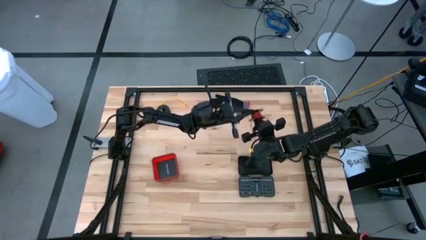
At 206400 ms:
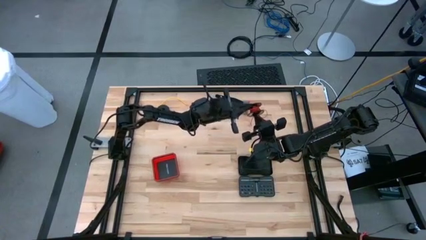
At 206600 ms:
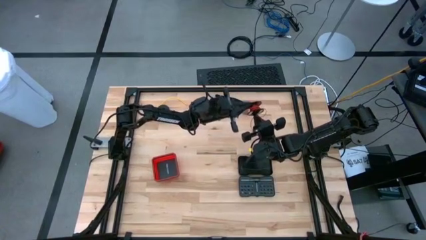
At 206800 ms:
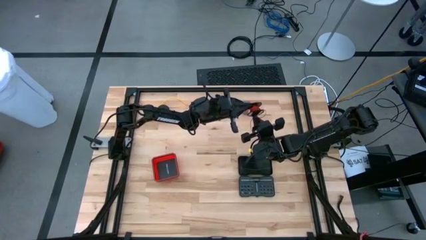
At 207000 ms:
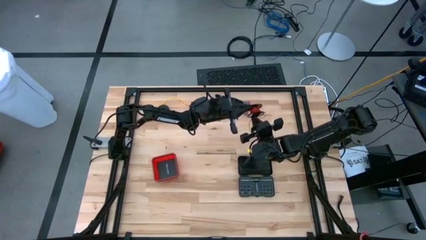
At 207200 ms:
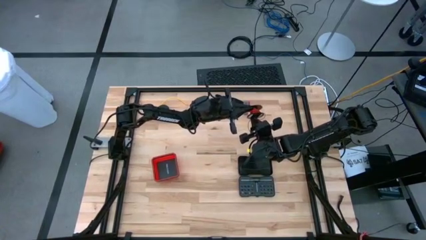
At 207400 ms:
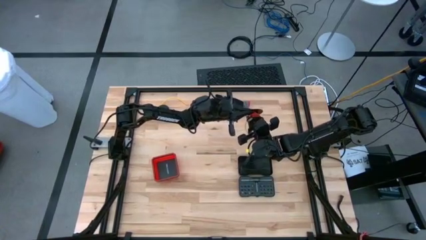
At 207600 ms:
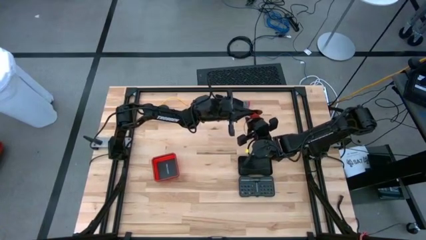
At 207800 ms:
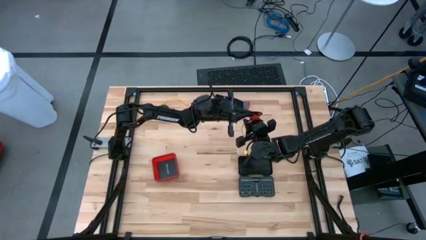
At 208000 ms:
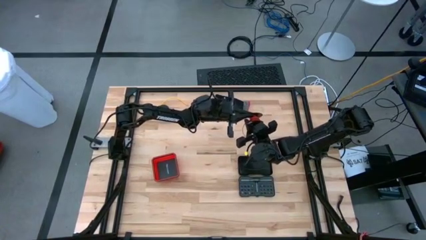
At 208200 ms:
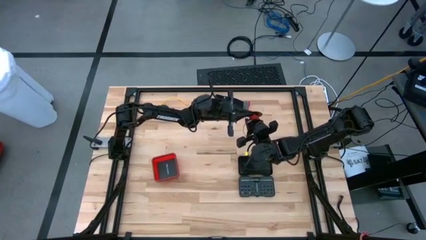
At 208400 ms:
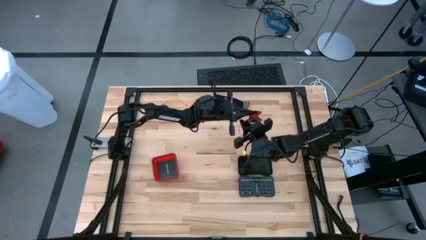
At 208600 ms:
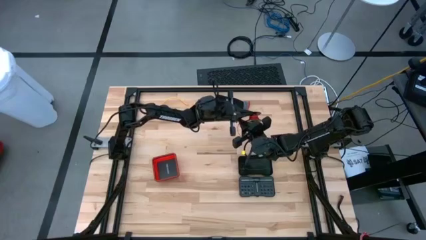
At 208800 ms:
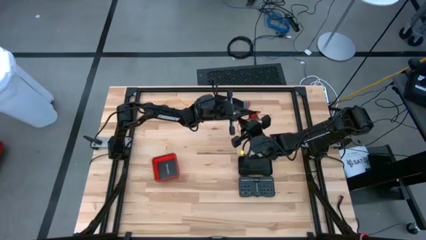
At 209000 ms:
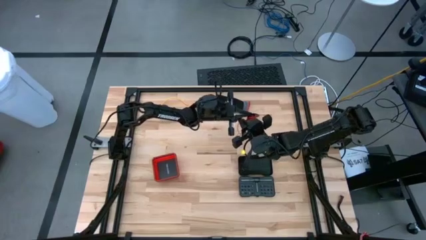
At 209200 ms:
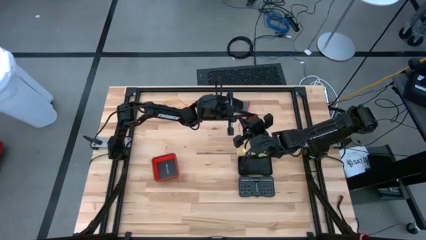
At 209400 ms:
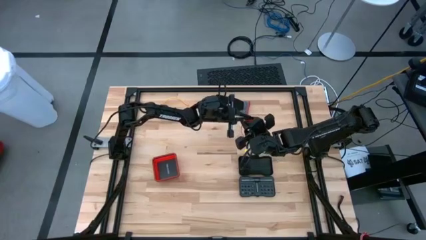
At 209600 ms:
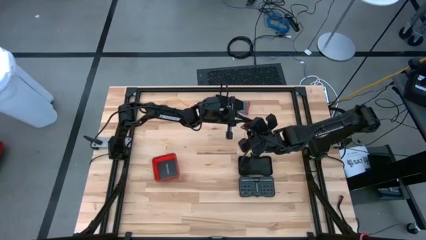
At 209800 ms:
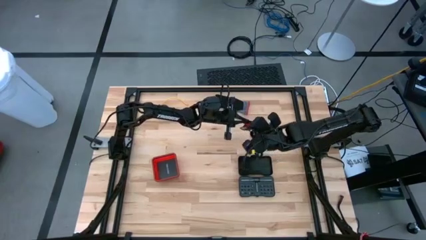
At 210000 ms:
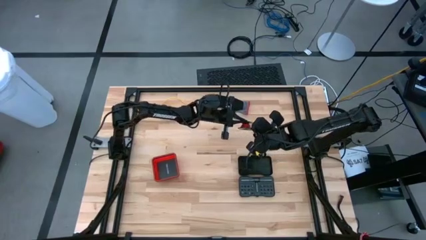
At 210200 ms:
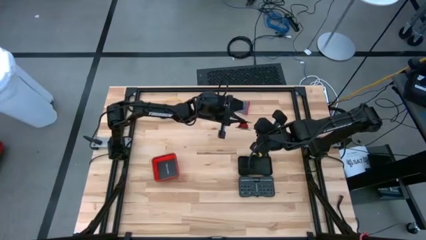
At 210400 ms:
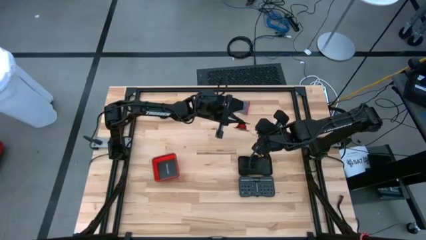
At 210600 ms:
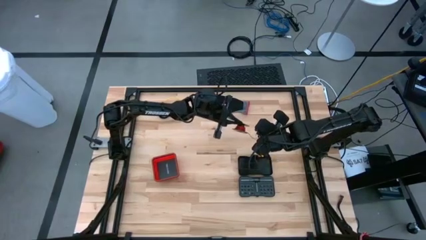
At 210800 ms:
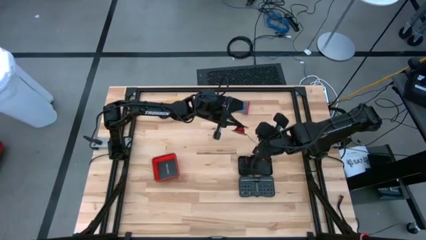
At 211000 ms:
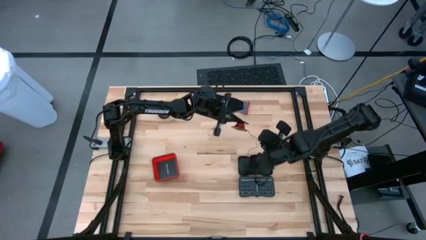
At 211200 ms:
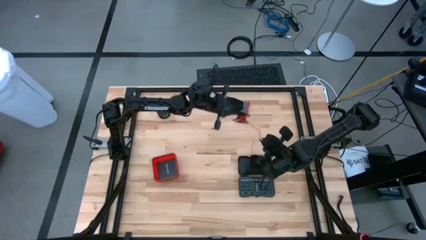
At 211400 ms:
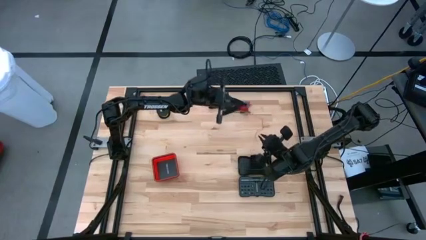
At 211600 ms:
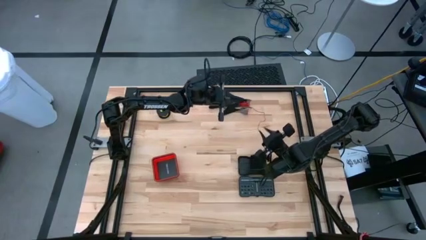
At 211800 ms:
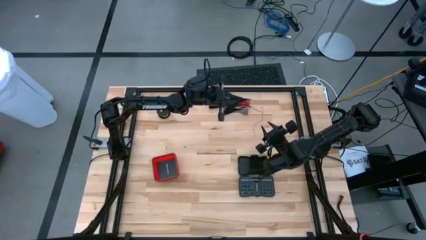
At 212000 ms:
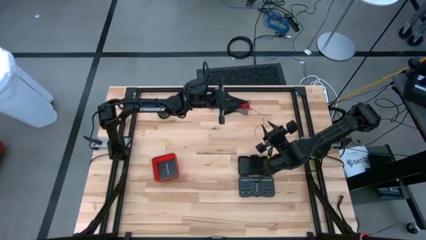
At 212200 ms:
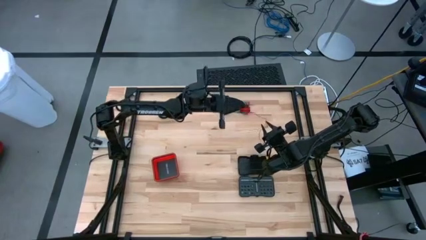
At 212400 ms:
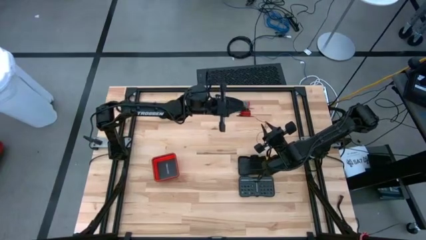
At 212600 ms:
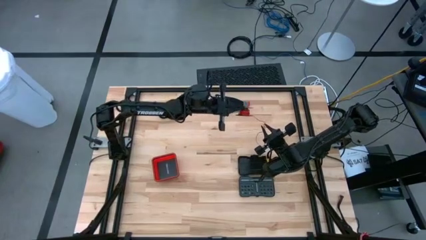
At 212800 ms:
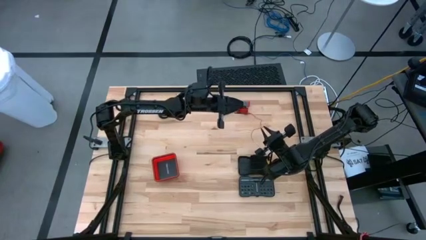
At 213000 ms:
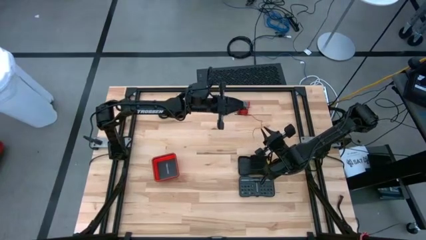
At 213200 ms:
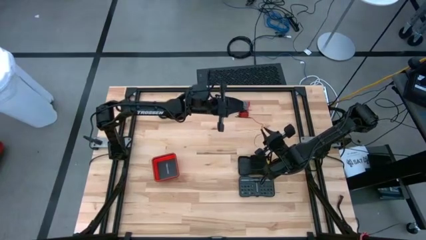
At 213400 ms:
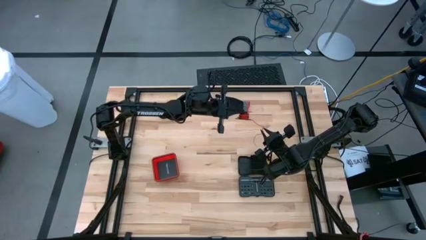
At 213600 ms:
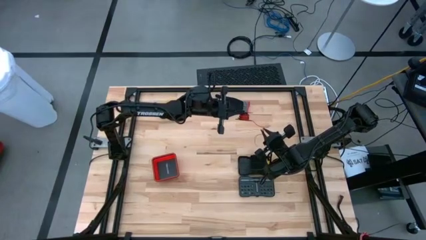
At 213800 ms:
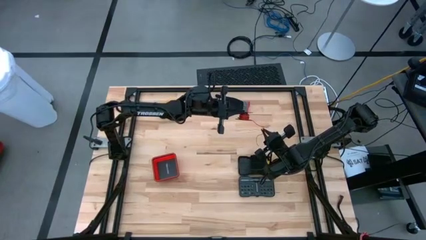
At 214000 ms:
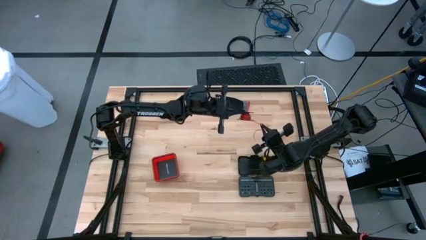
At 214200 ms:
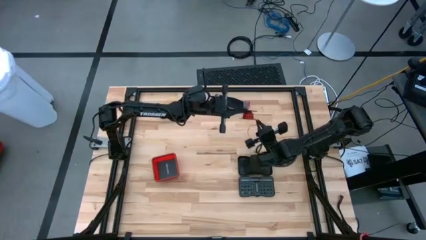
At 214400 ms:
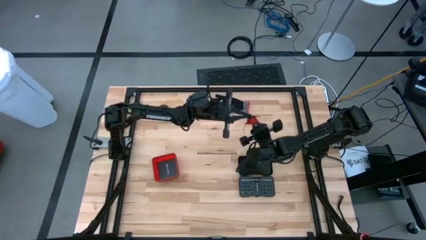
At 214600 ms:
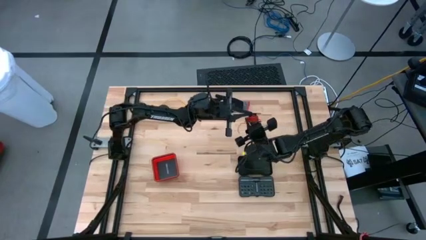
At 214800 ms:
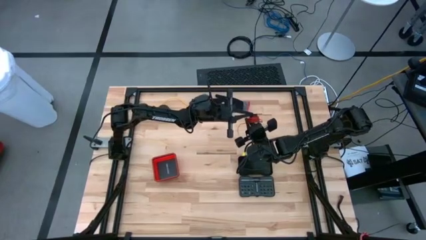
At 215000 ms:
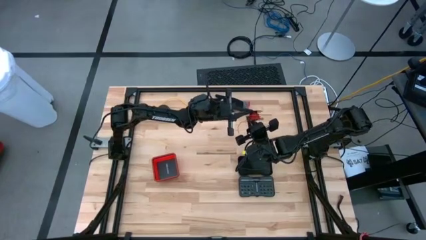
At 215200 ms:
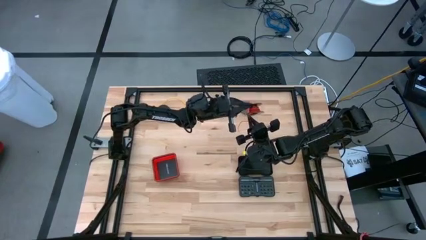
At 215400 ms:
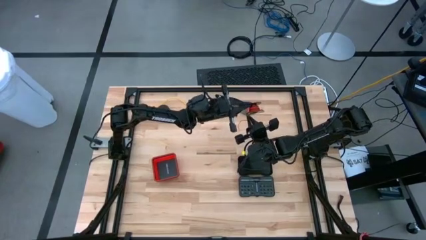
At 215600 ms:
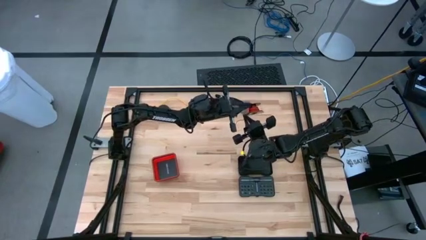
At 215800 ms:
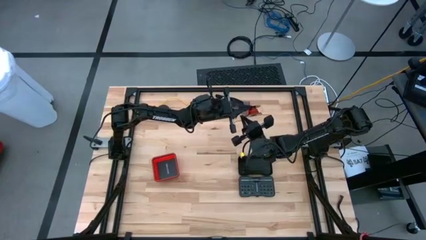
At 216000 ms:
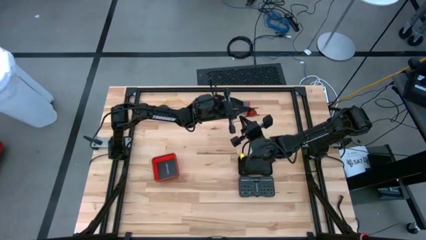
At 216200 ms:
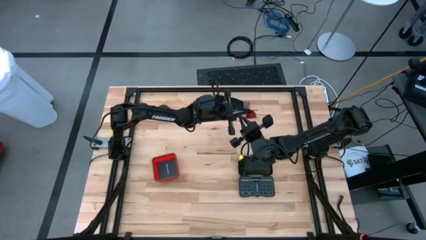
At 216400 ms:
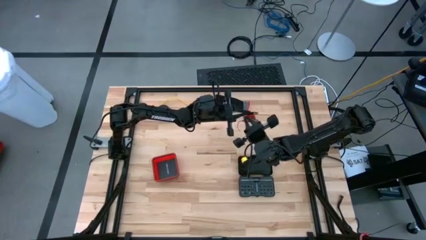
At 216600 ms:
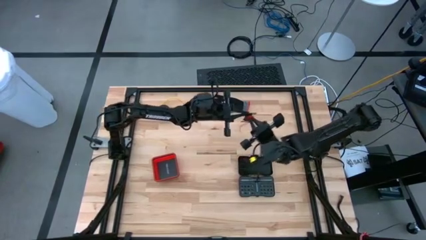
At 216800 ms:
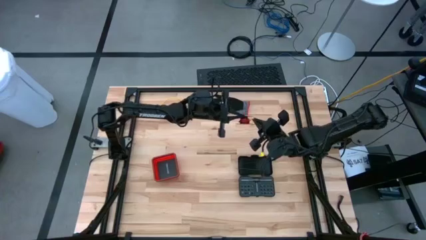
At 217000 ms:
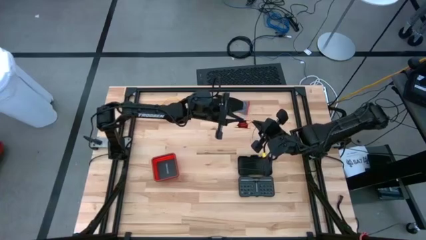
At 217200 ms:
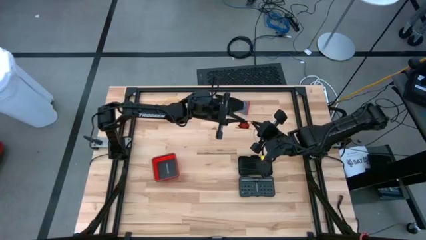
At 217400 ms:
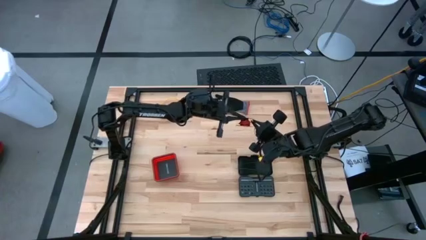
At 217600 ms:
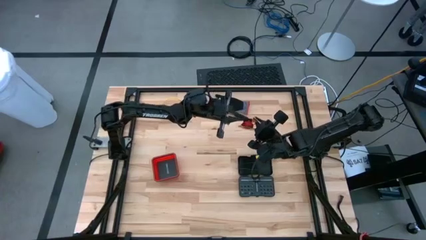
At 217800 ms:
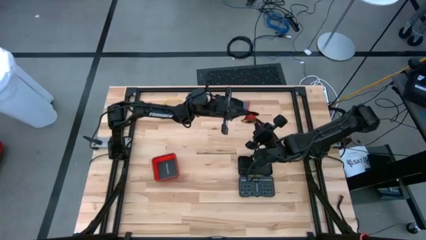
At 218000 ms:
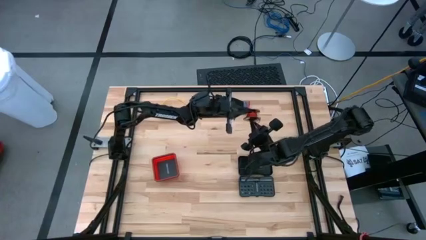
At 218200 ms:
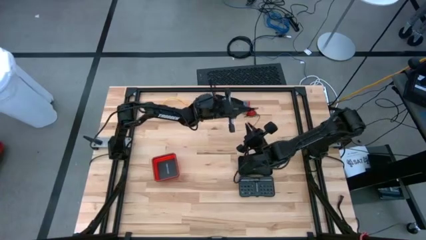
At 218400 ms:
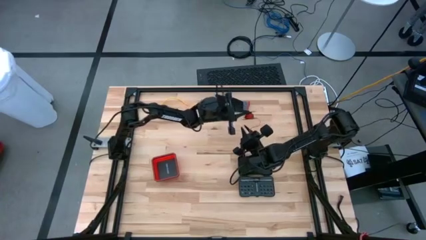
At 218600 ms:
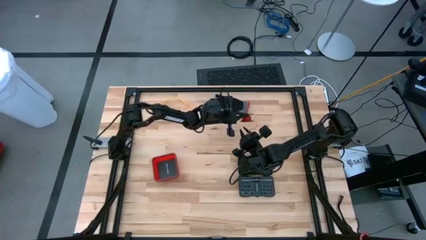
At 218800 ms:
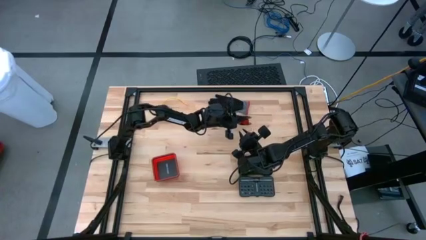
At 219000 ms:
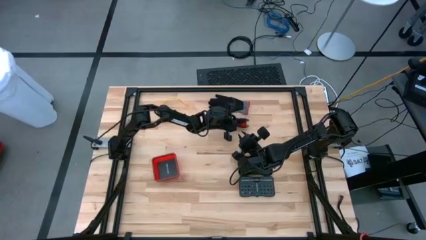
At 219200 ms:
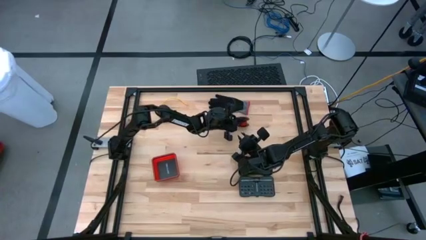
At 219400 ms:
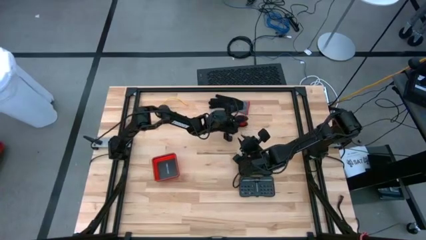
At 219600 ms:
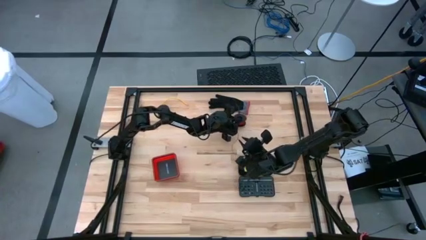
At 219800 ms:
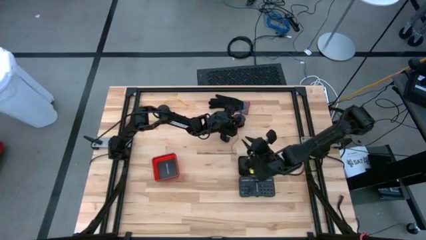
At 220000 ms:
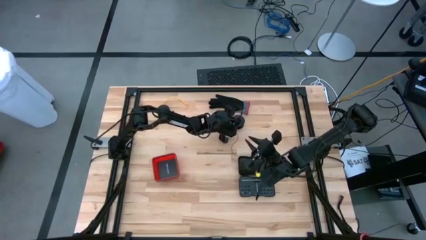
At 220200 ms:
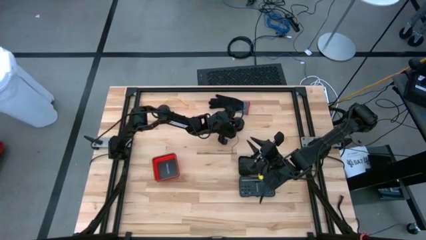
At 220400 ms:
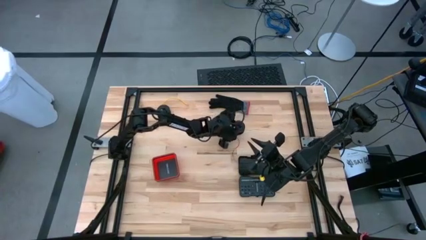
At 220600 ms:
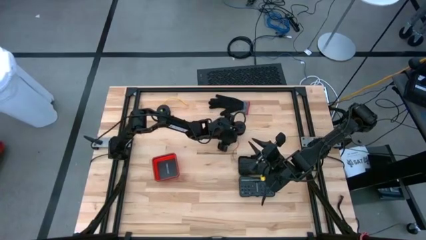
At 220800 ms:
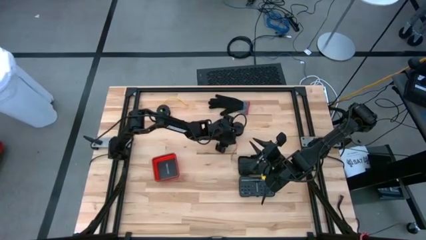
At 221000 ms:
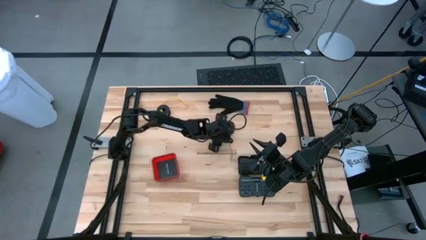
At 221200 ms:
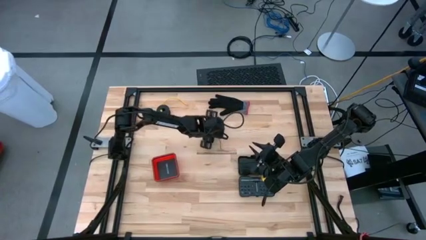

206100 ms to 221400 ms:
Task: Coil cords
Coil the red wire onto the spool
